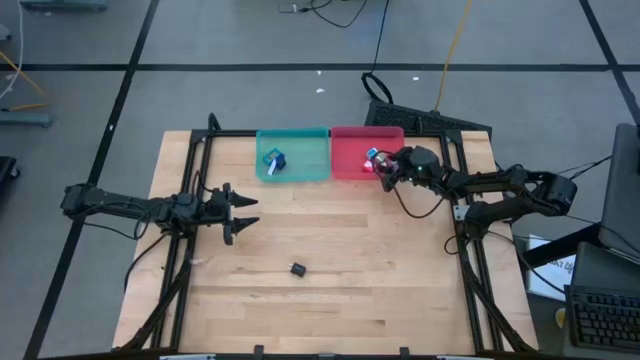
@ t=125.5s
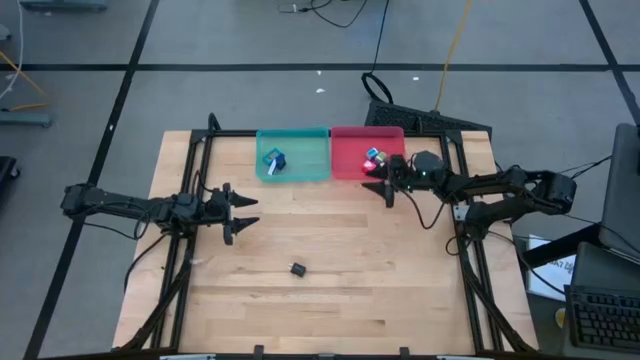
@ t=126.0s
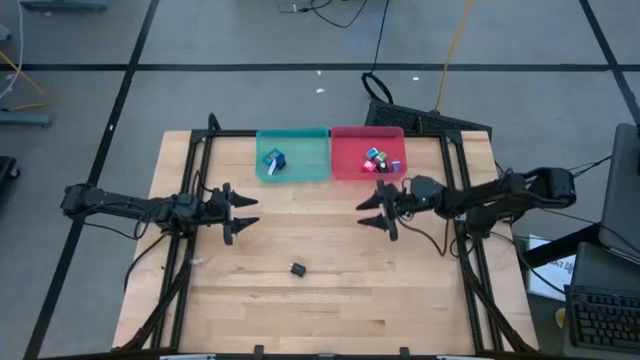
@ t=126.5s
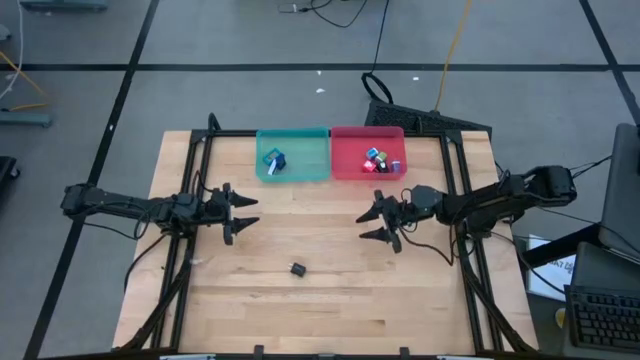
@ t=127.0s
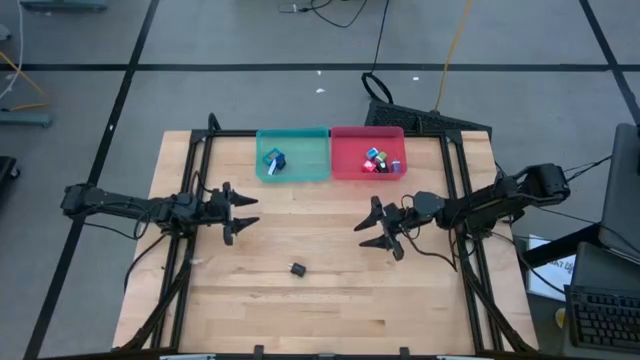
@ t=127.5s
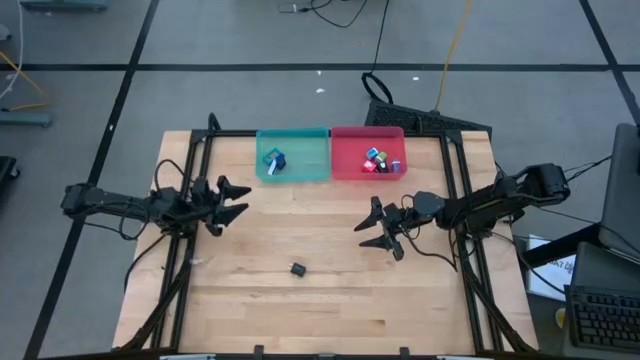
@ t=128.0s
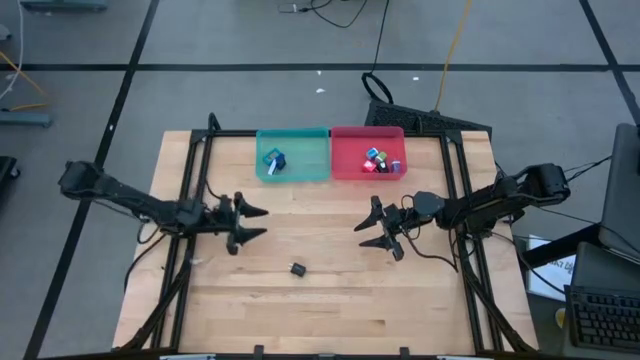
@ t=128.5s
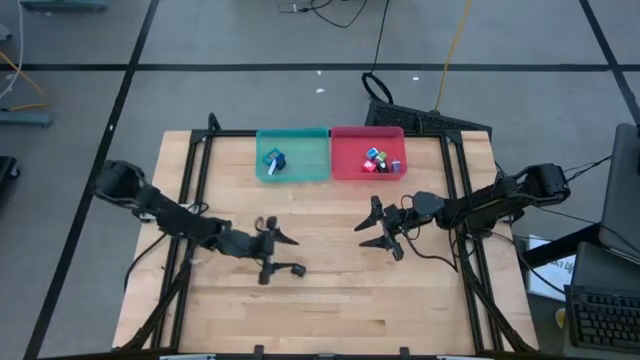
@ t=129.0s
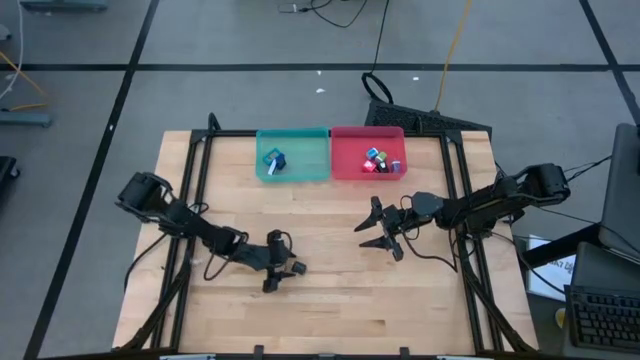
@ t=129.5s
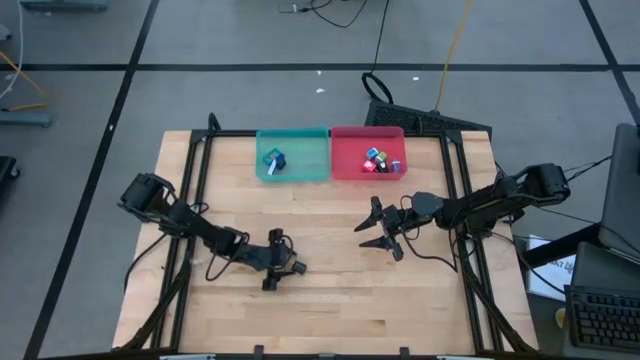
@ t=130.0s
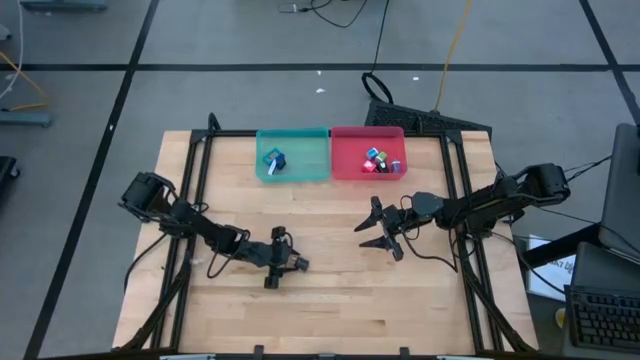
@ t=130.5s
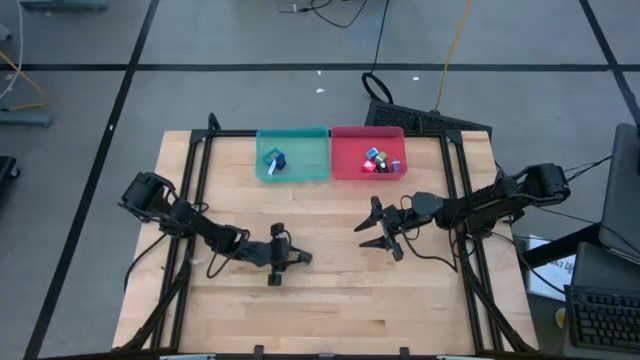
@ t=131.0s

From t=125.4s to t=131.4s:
Task: Sort charging adapters and watches
Put the black charging adapter in the red bin

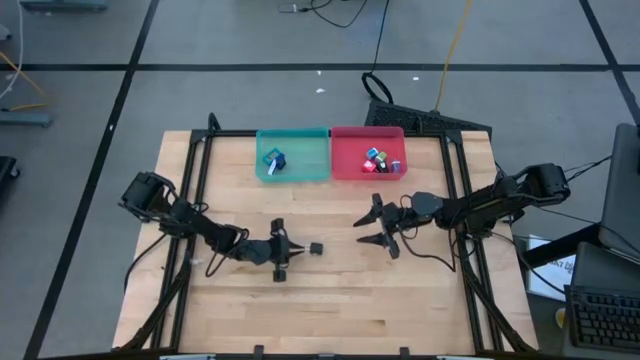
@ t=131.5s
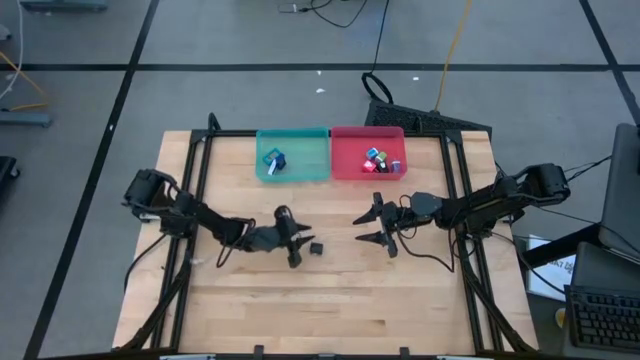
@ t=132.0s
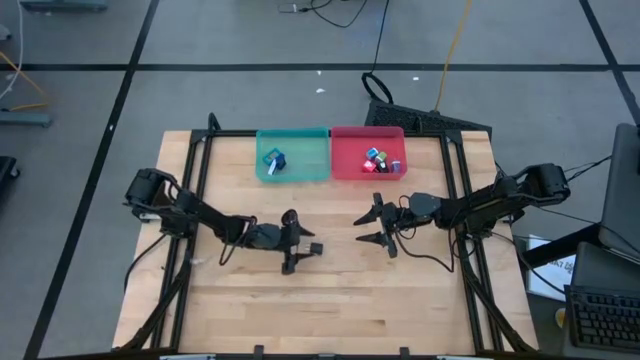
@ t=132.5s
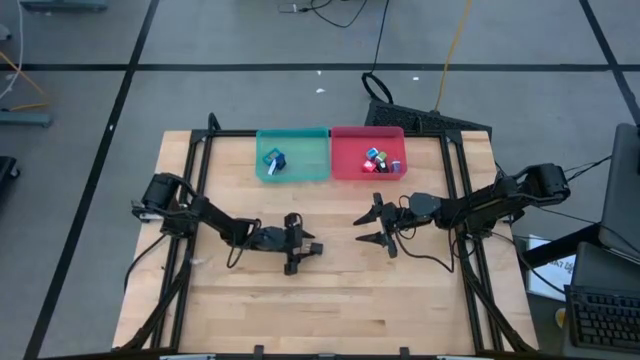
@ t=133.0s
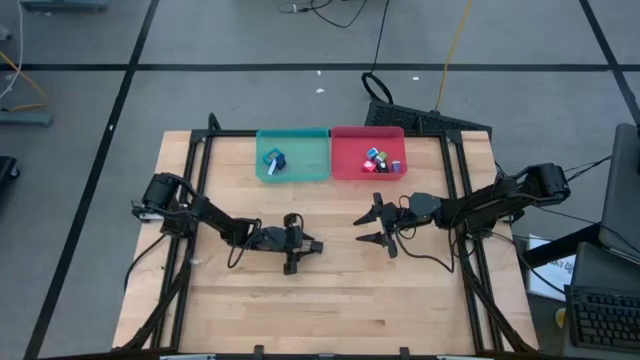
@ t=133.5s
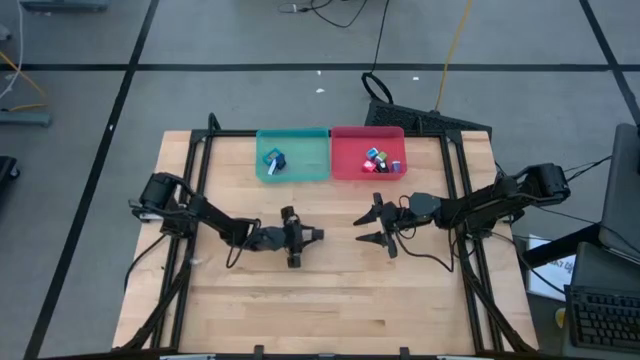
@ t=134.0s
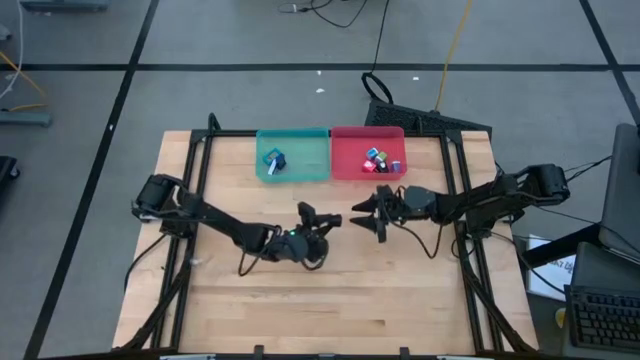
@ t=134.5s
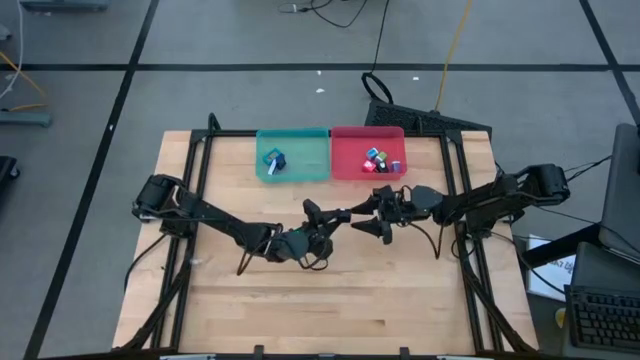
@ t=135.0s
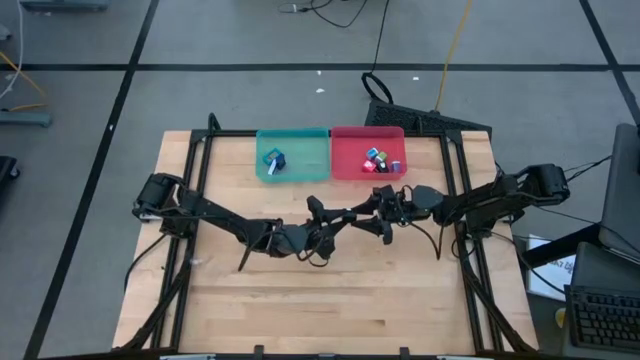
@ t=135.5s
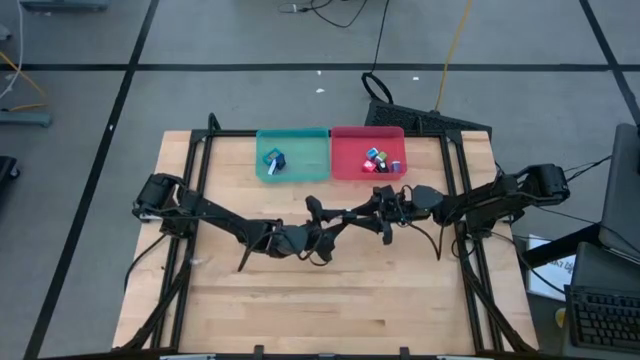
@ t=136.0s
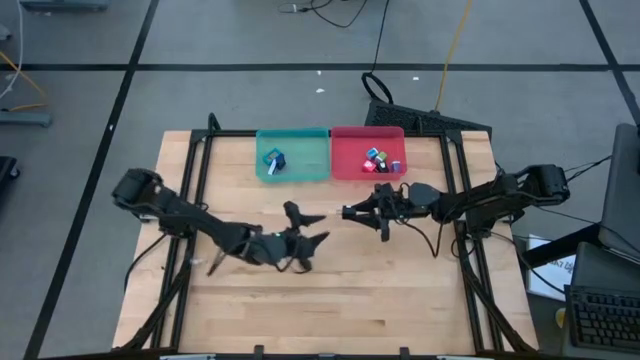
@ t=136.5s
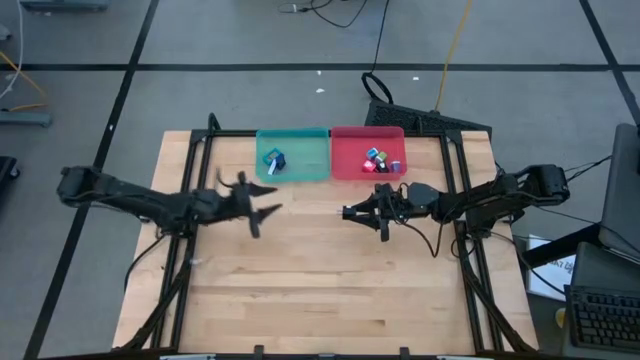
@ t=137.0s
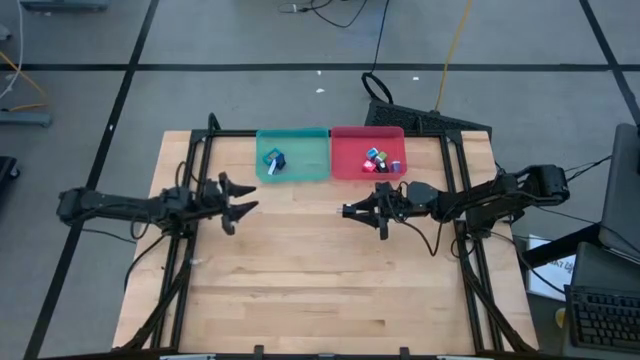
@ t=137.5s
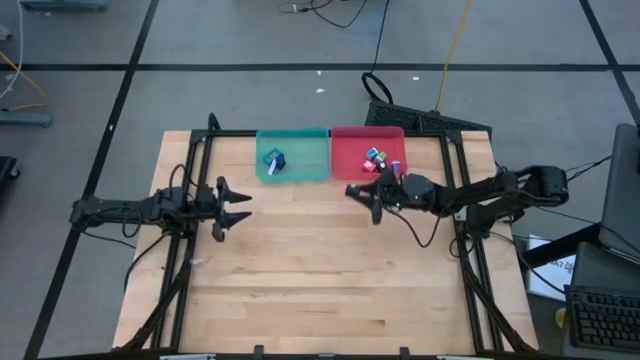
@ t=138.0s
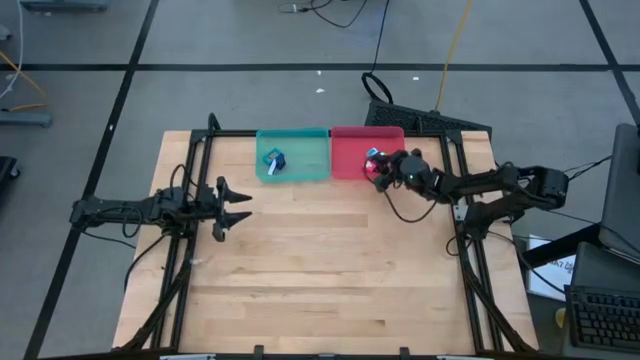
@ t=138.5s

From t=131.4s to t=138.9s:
Put the black charging adapter in the red bin

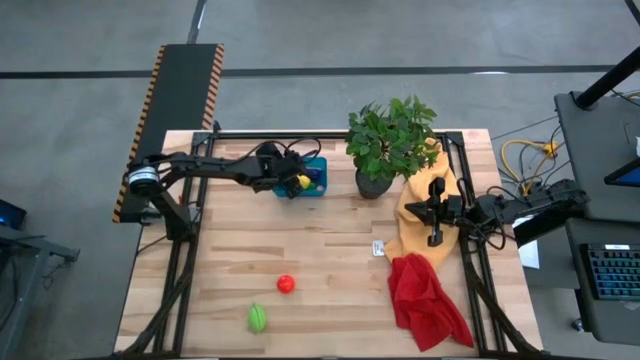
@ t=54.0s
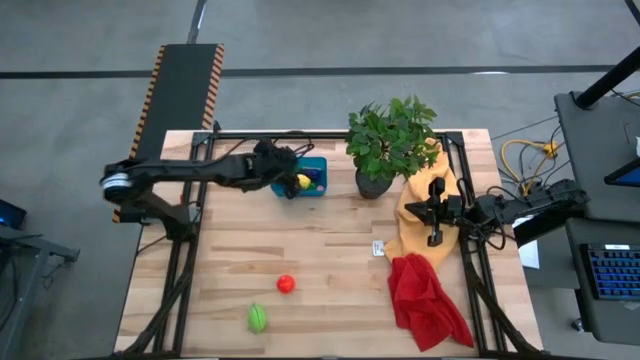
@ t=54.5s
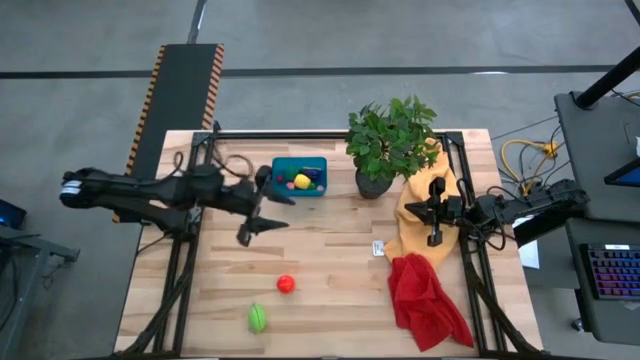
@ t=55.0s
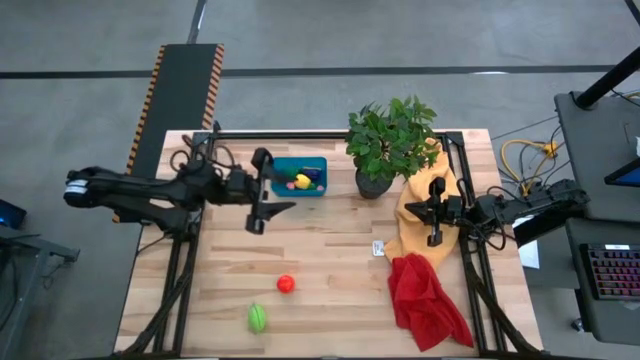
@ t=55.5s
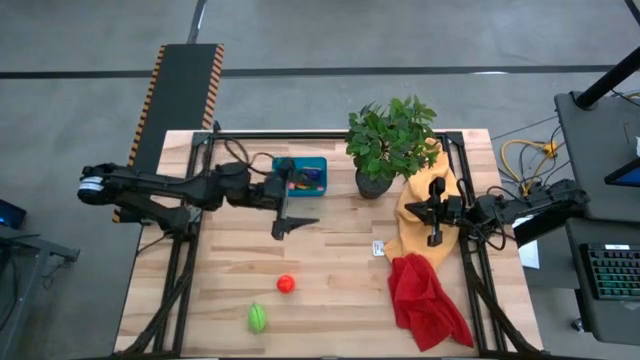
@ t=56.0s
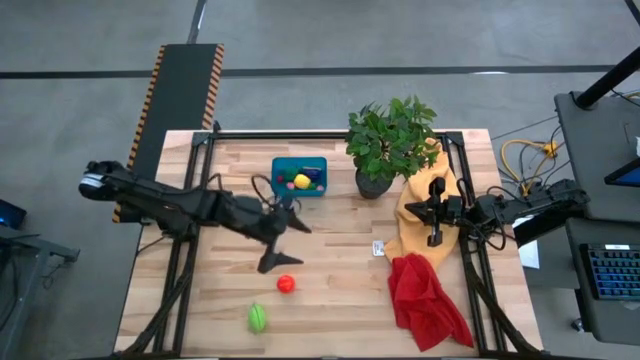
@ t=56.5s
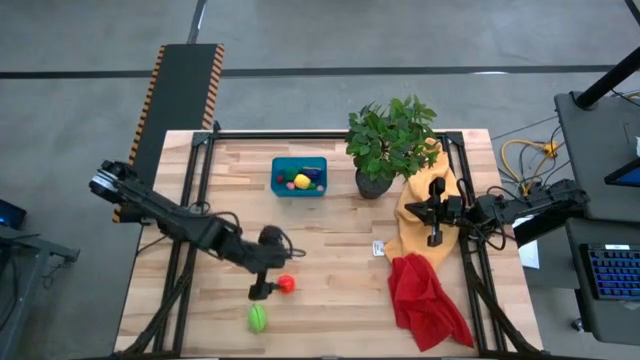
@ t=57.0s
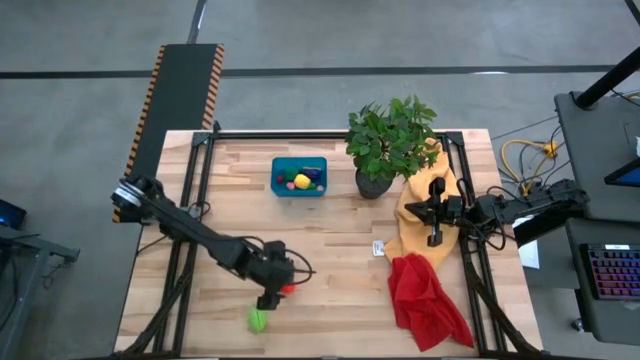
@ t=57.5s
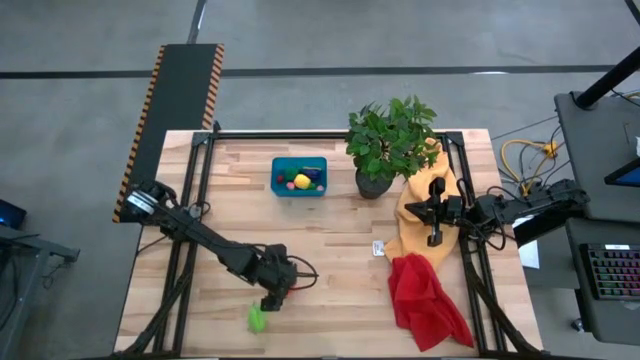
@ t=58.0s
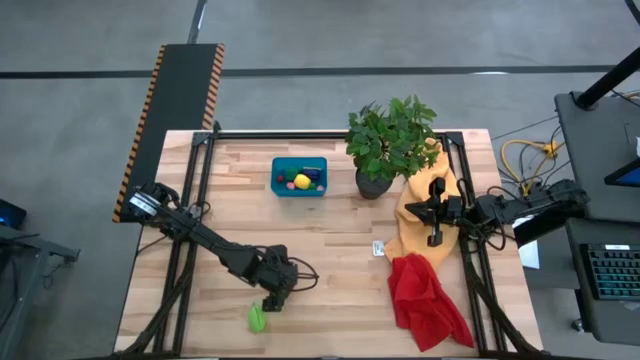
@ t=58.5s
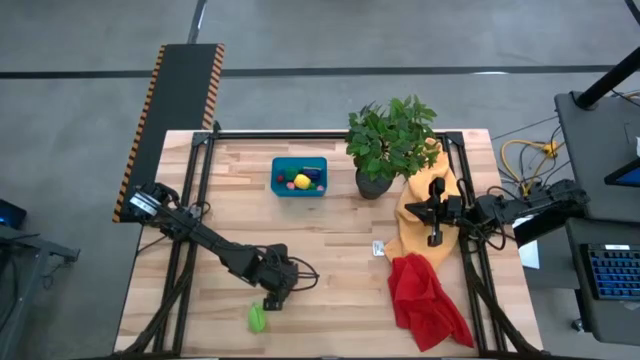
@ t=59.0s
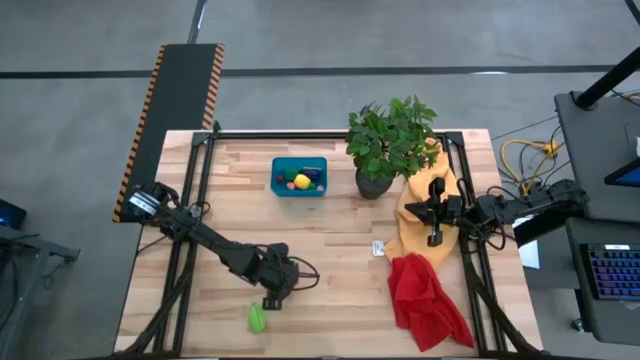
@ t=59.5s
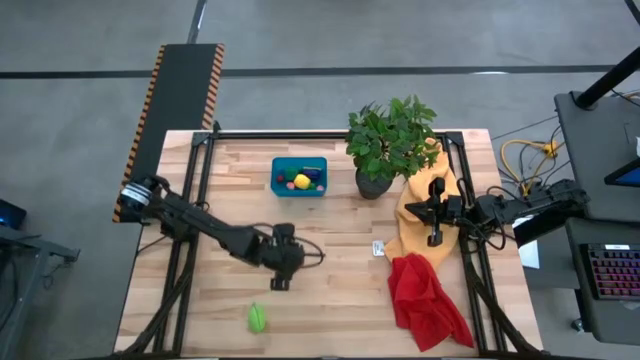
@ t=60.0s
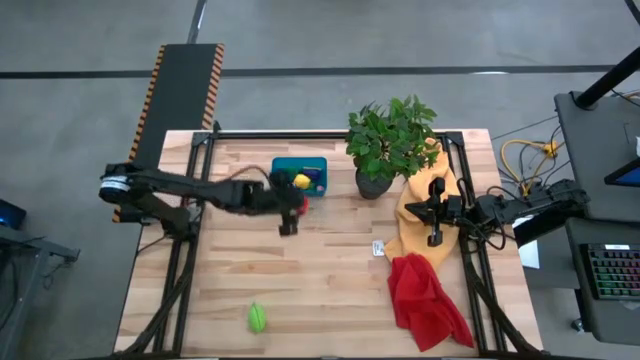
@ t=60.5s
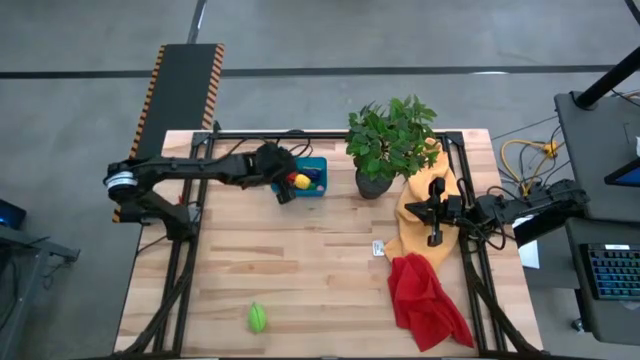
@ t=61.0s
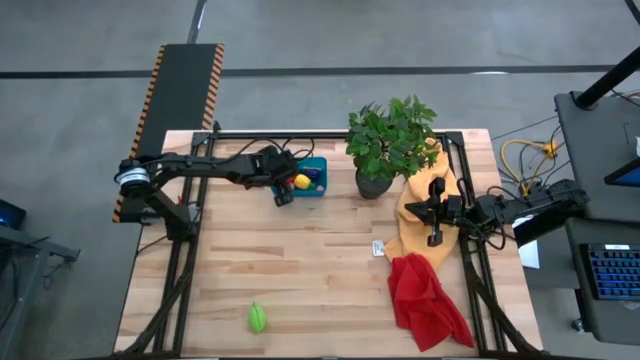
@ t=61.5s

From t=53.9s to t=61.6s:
Task: Pick and placing Produce into tupperware
Put the tomato into the bin
